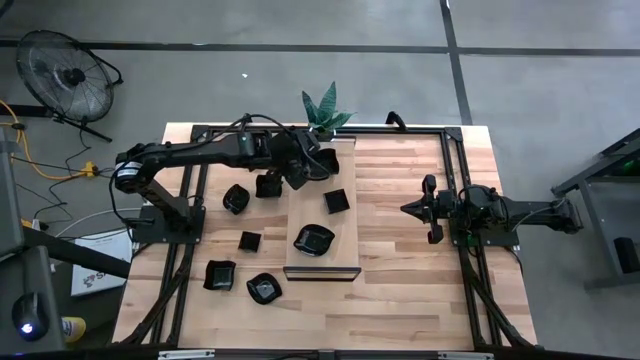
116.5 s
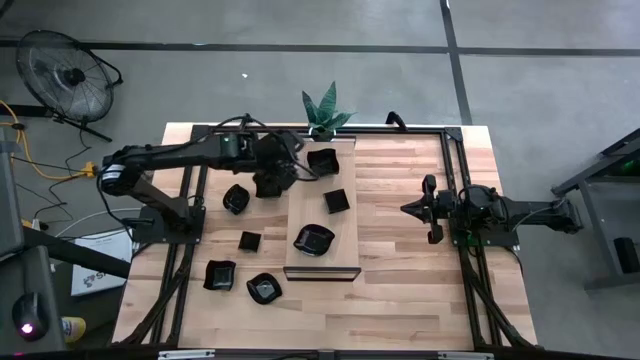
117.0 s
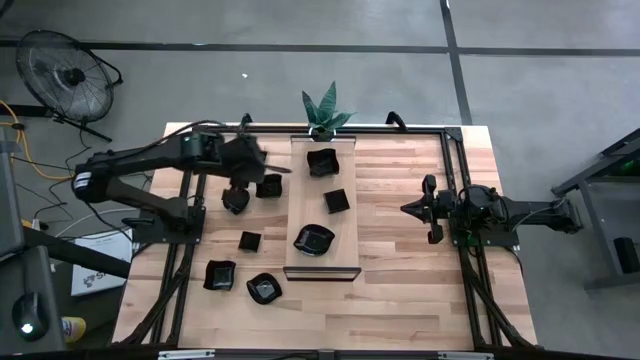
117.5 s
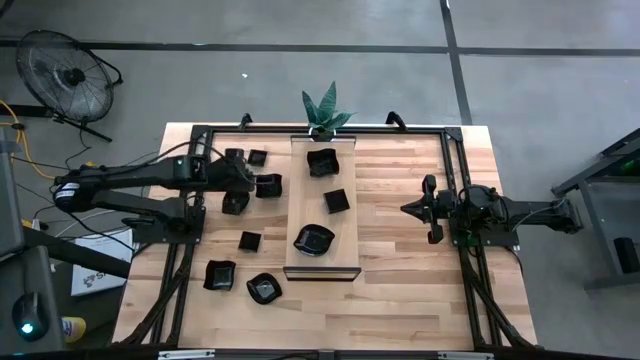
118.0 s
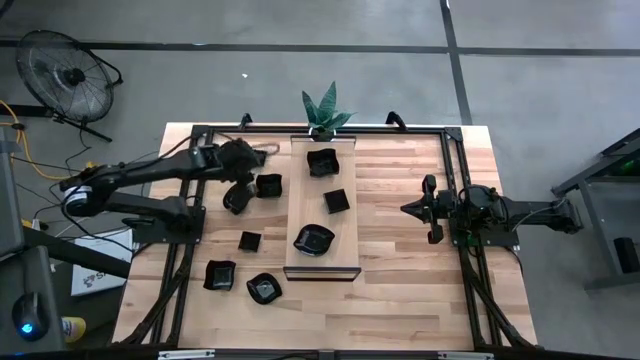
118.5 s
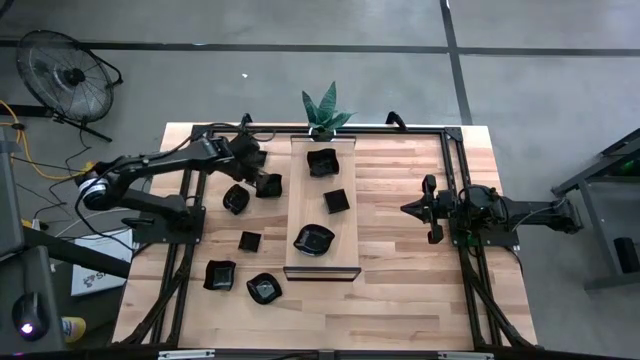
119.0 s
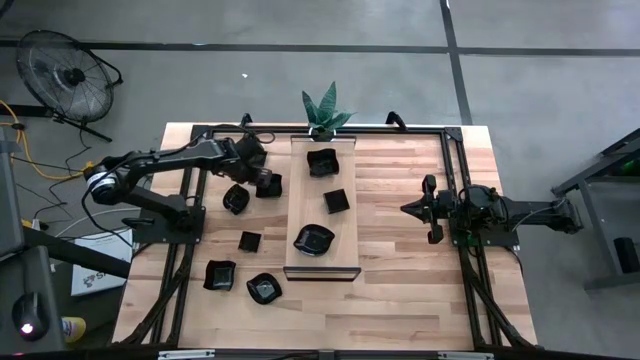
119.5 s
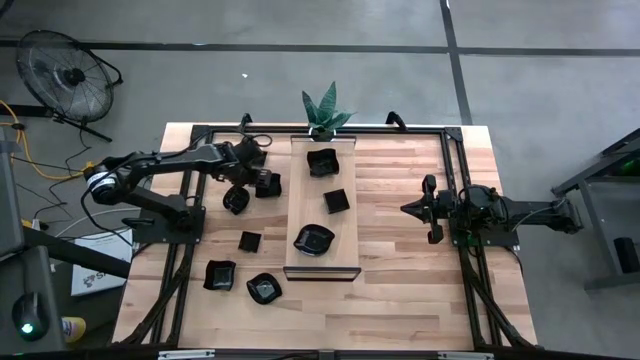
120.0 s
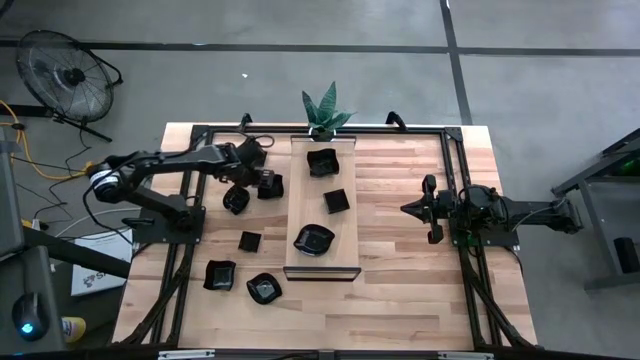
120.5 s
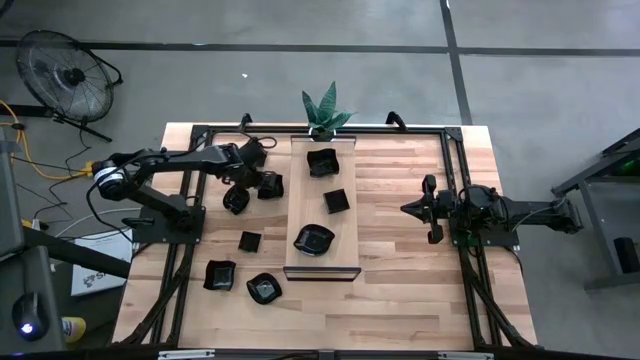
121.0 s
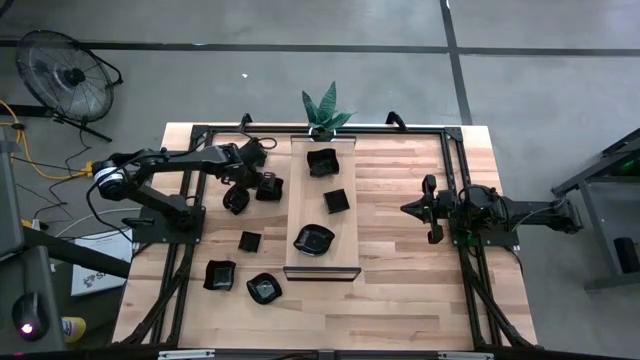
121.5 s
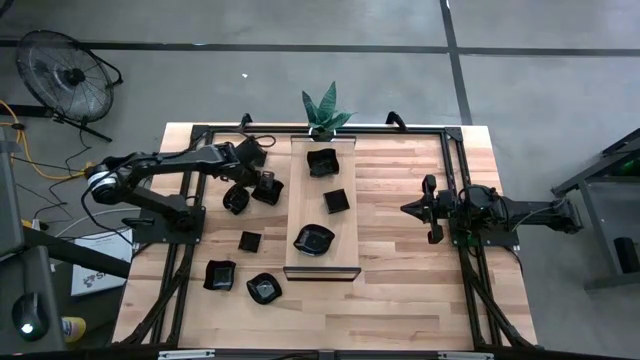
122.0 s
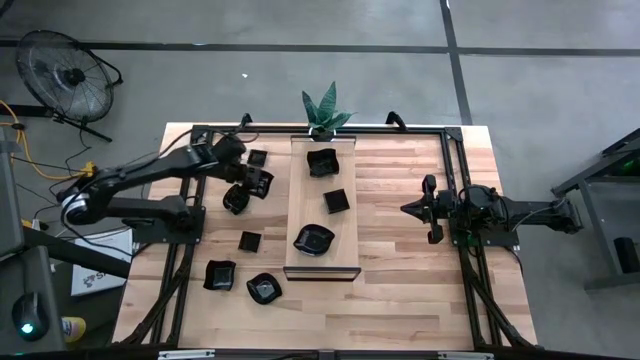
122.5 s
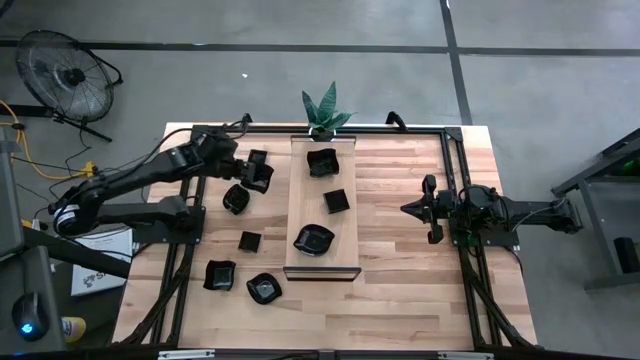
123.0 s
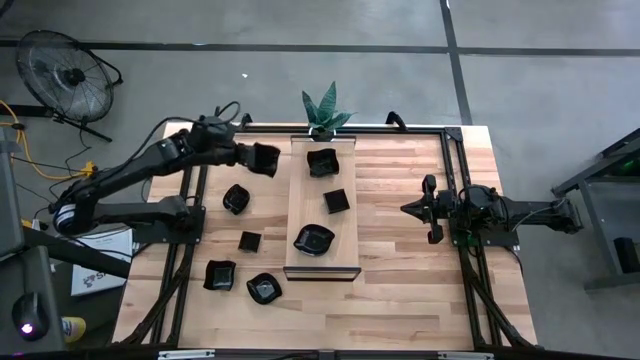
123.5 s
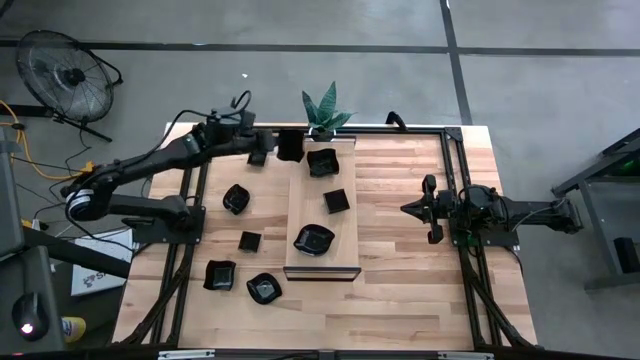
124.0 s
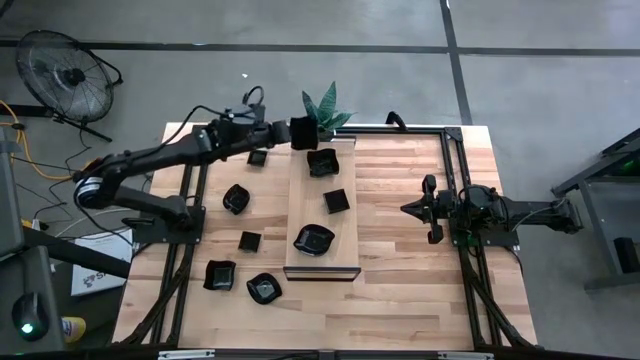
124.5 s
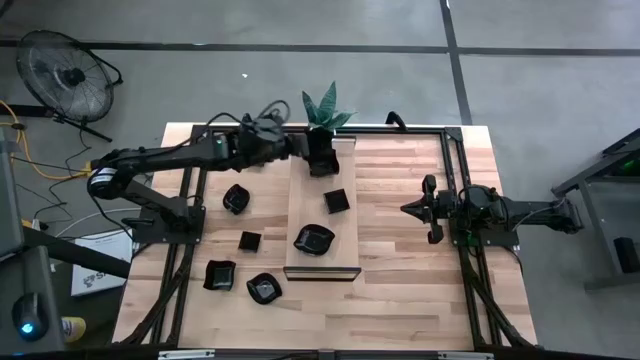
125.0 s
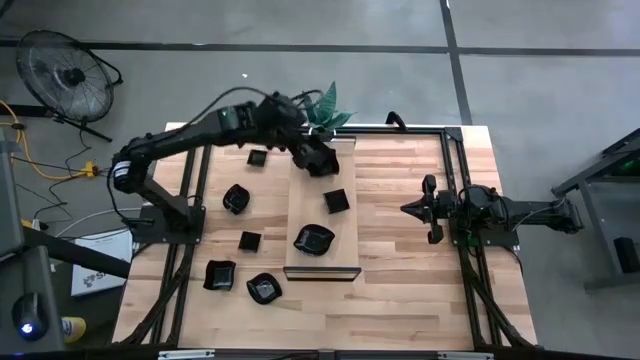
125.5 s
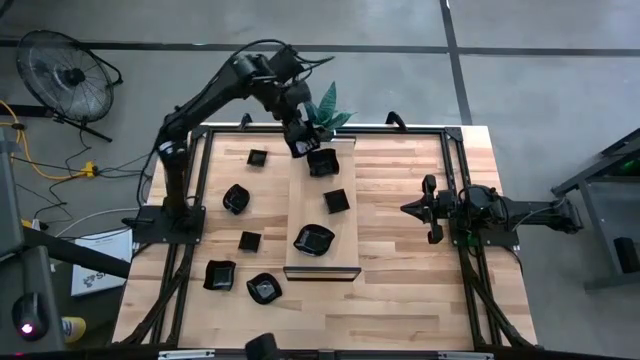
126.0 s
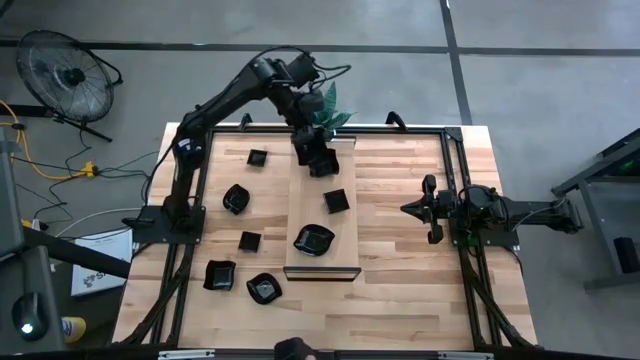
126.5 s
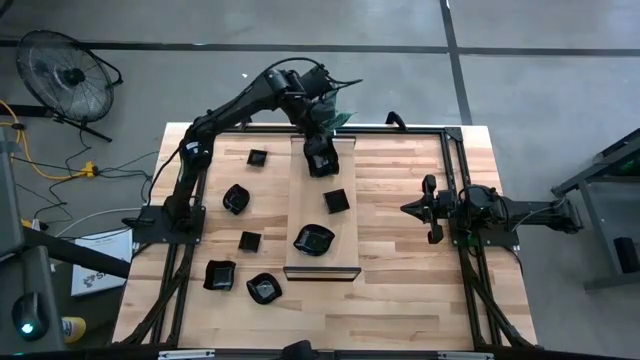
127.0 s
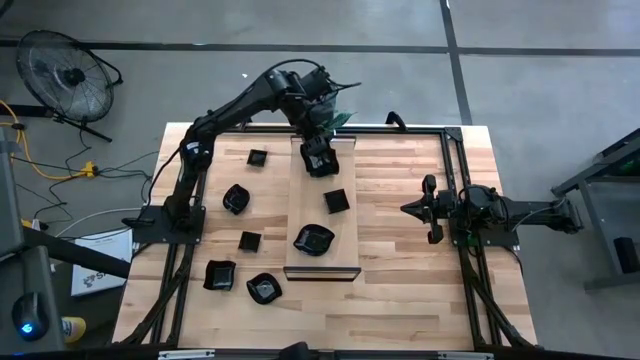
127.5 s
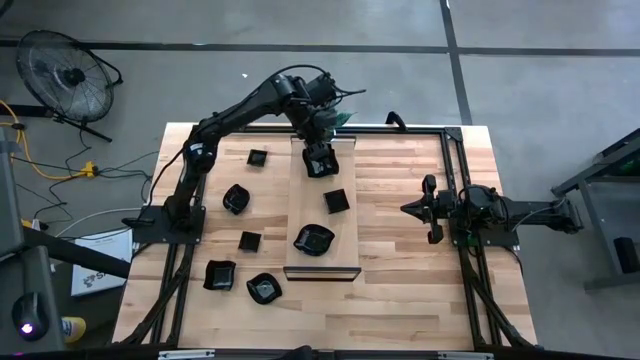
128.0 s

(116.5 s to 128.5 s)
Task: Pick & Place Mini shaped plates
Stack the black distorted square plate on top of the black distorted square plate on the shelf

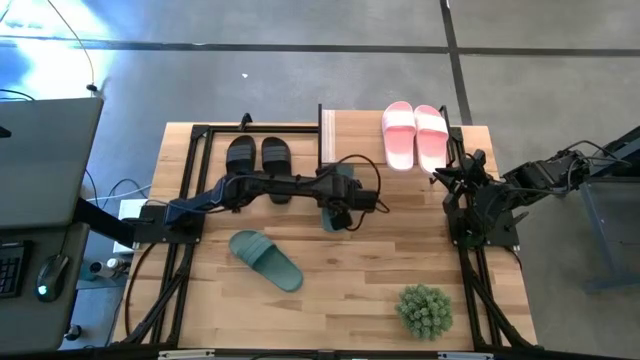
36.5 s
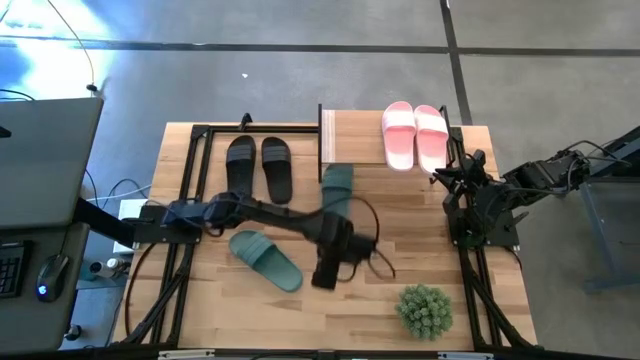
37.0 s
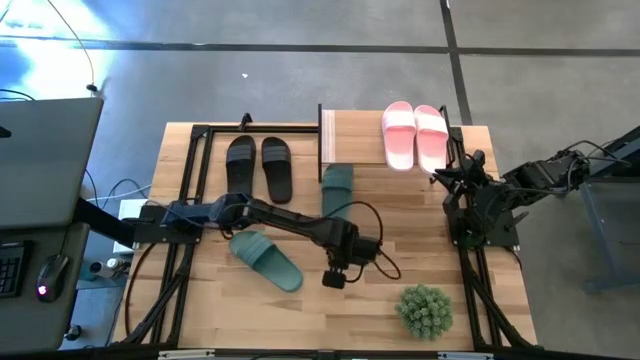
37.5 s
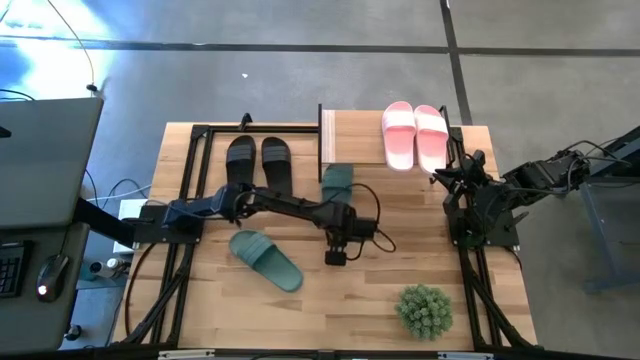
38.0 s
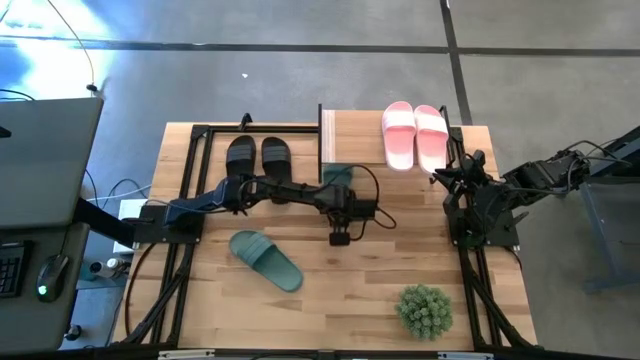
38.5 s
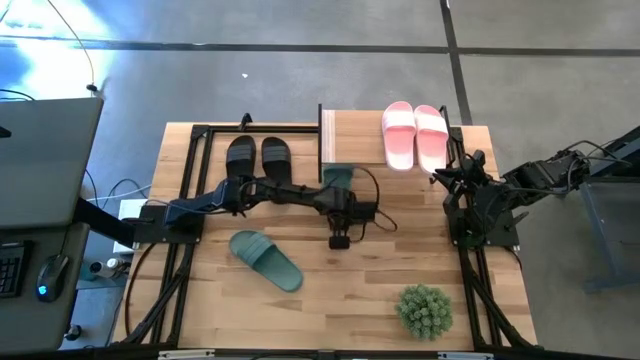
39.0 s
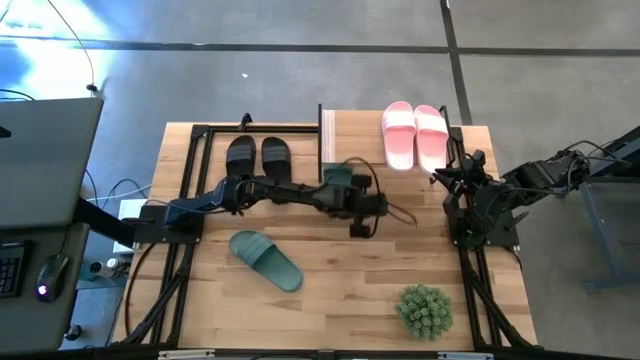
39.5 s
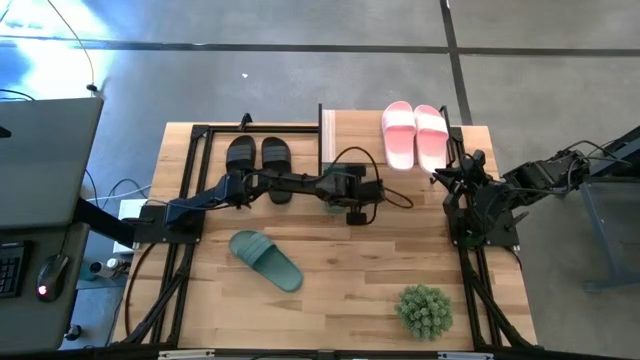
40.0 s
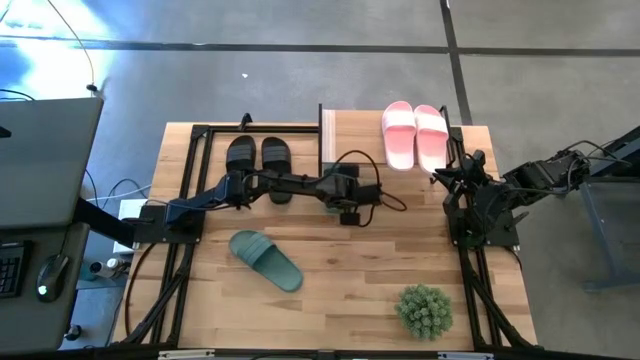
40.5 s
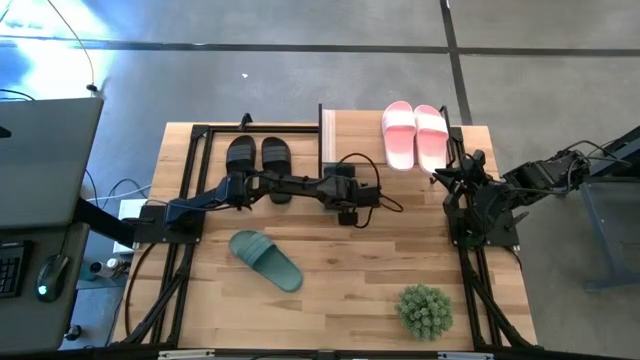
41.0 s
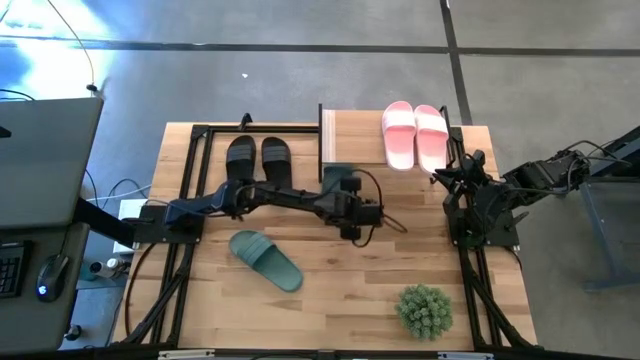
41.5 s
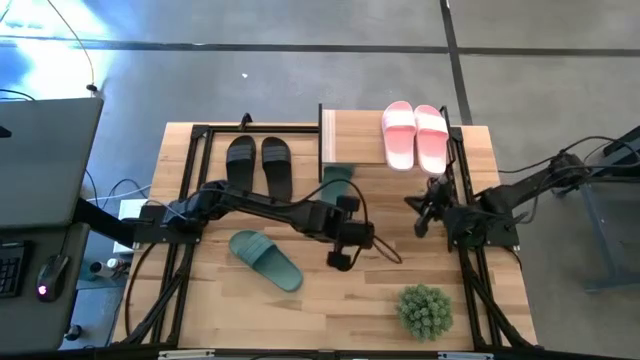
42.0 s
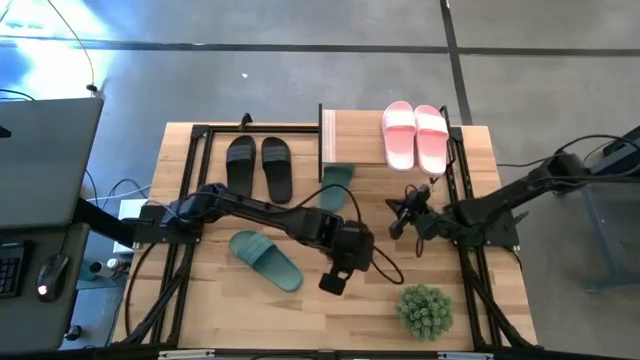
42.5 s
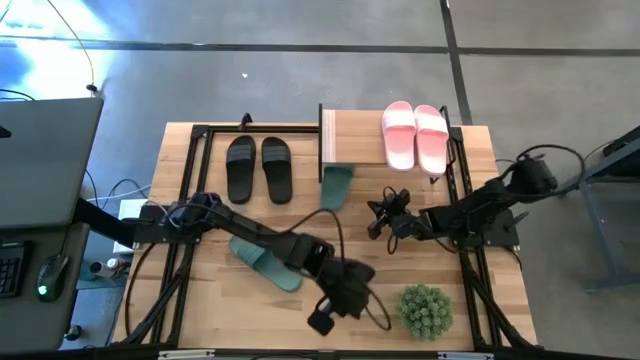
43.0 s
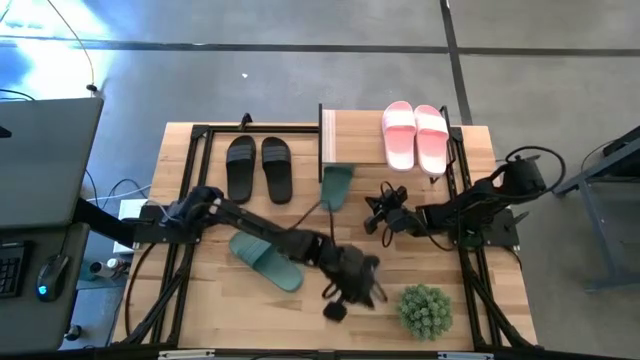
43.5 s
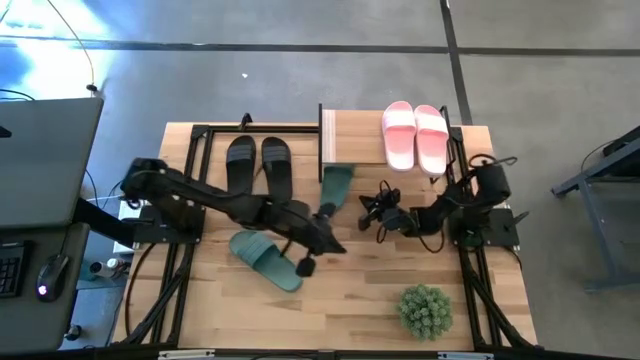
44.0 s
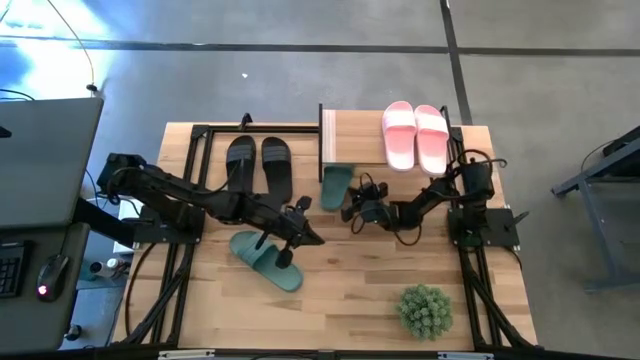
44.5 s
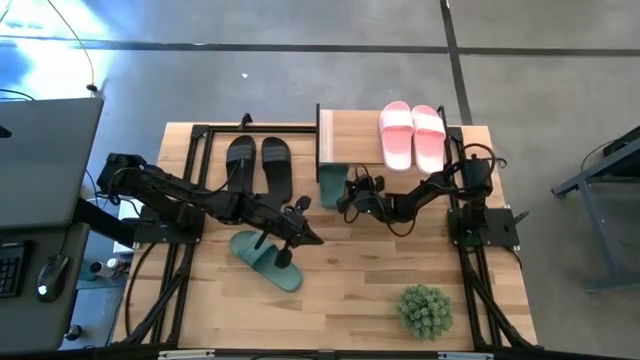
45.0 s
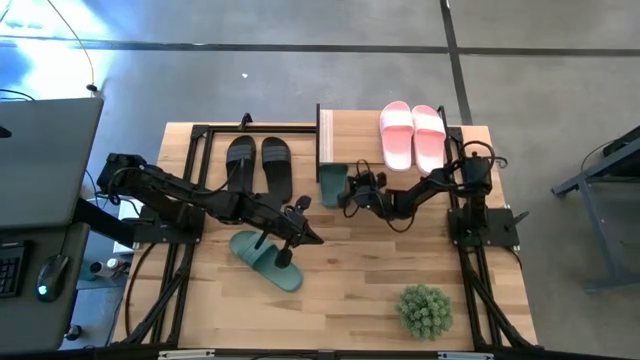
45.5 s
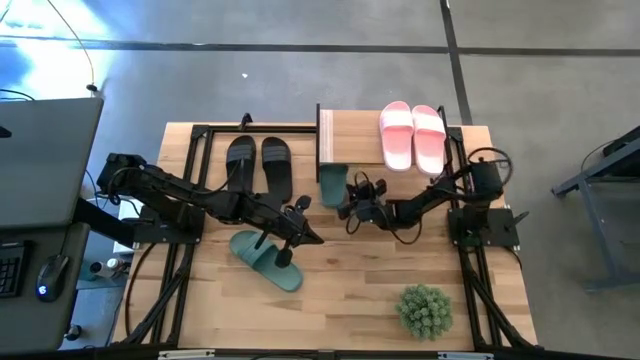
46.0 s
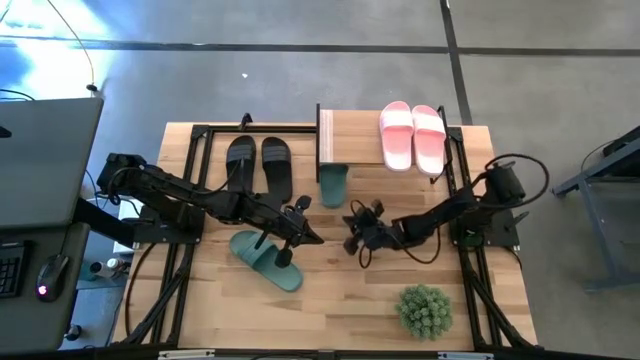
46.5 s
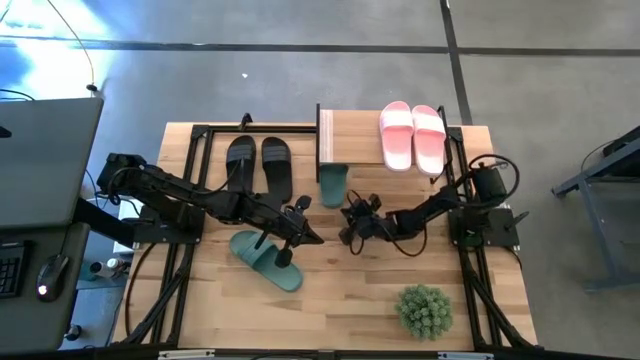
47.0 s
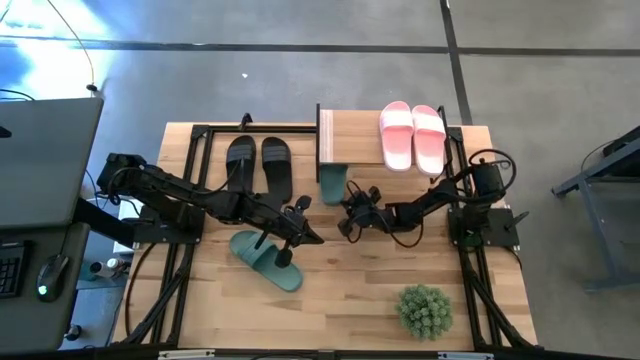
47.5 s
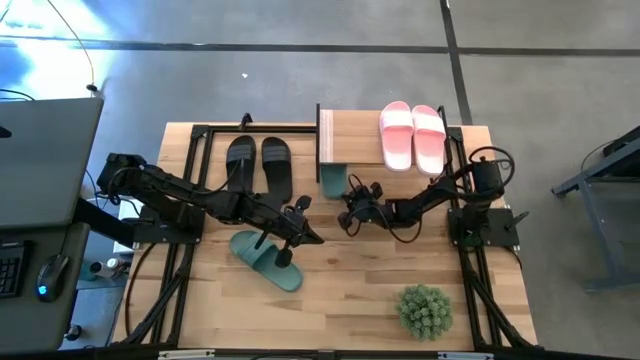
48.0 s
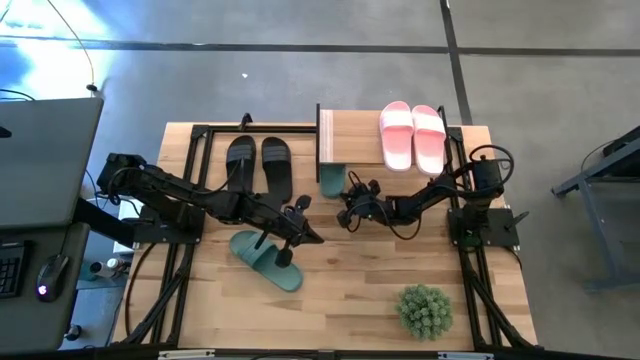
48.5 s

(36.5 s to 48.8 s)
Task: Pick and place slides into the shelf
Put the bottom green slipper under the shelf
